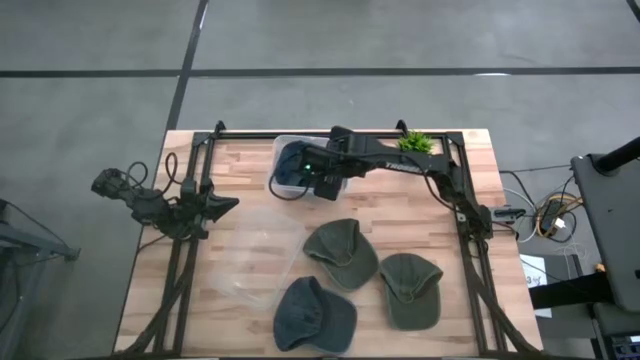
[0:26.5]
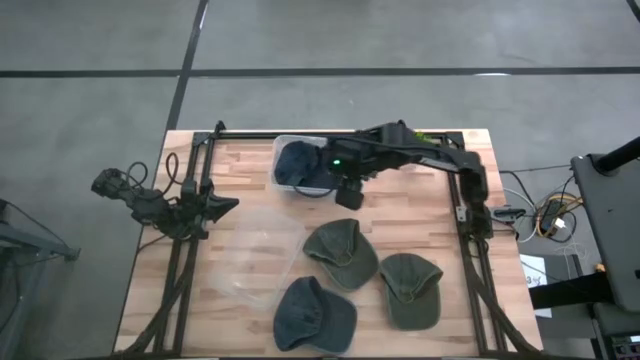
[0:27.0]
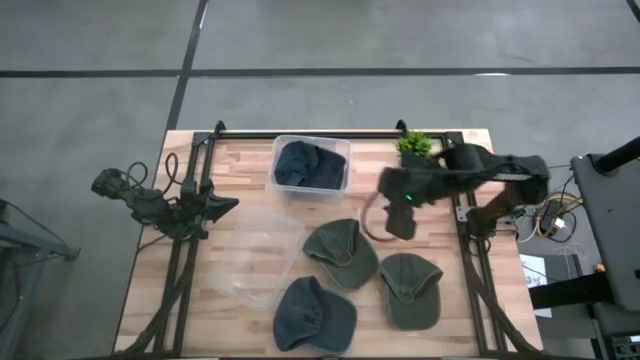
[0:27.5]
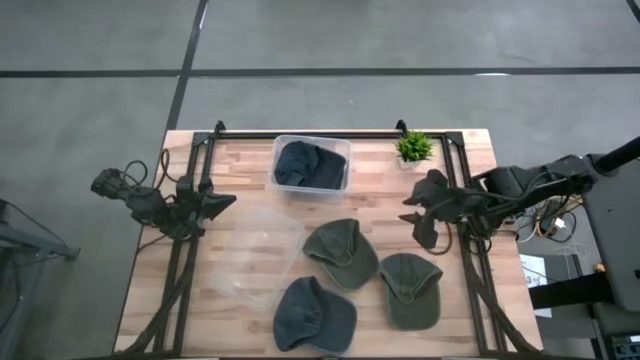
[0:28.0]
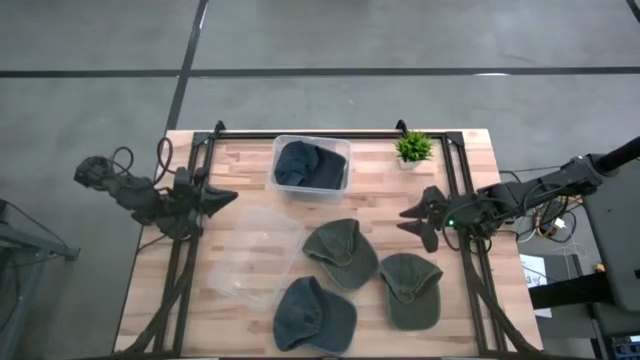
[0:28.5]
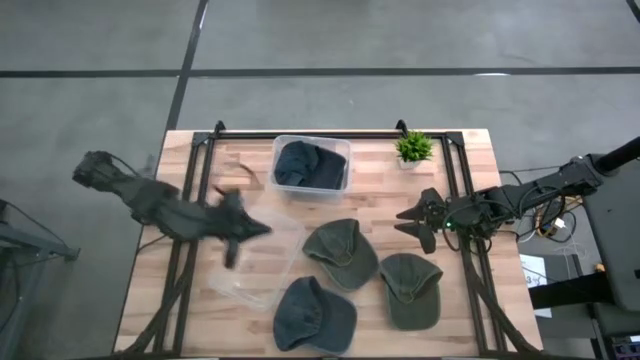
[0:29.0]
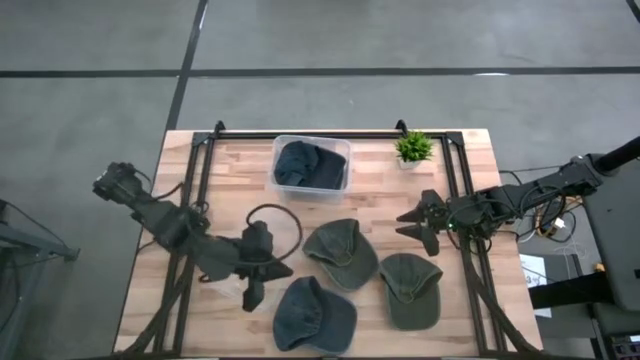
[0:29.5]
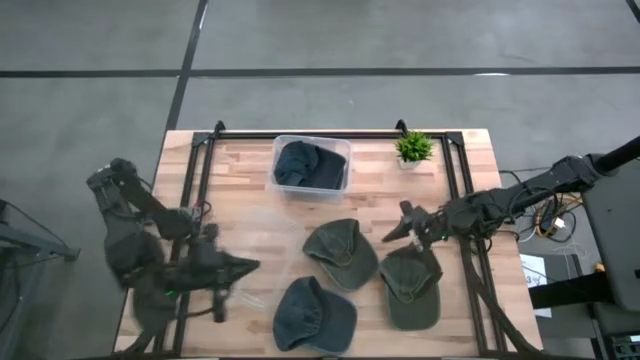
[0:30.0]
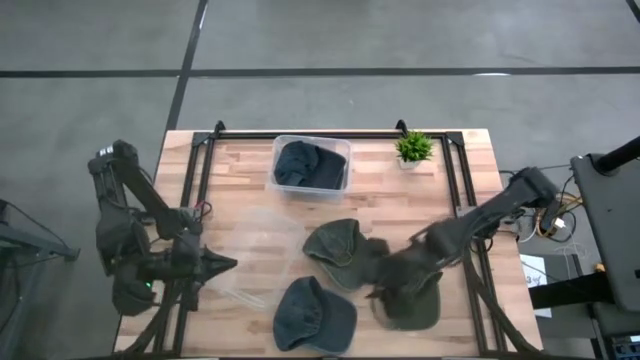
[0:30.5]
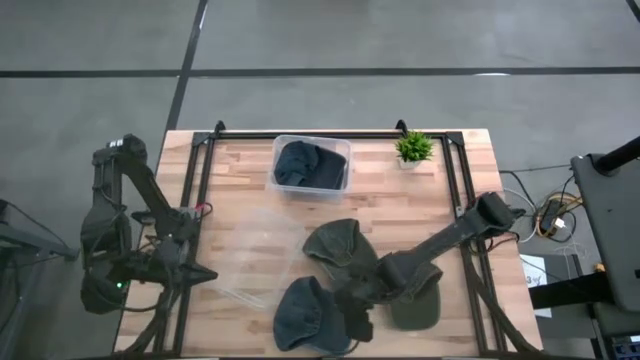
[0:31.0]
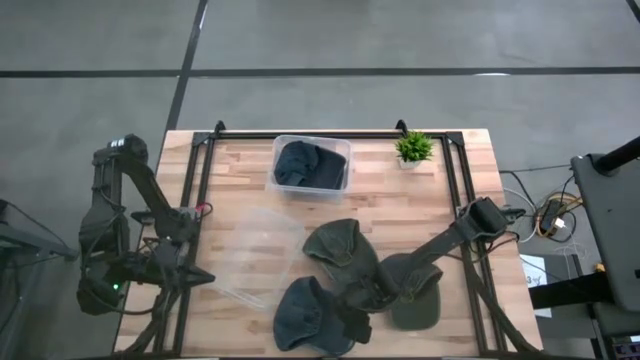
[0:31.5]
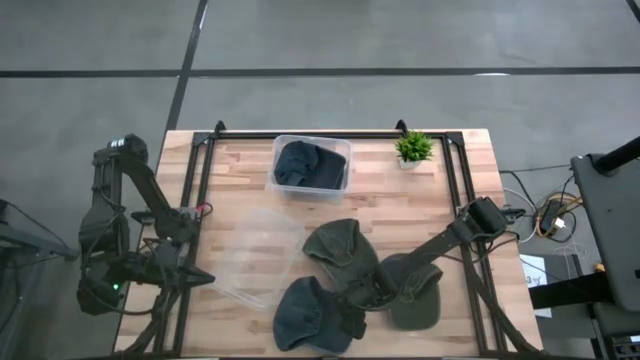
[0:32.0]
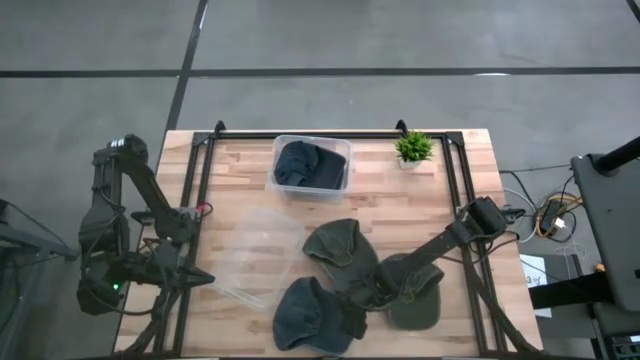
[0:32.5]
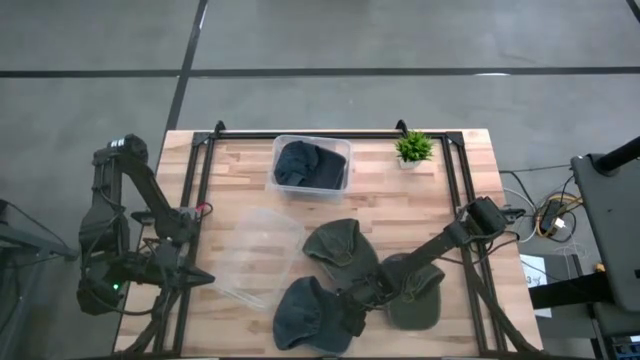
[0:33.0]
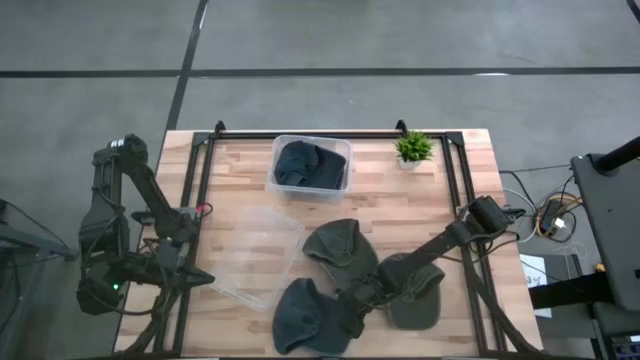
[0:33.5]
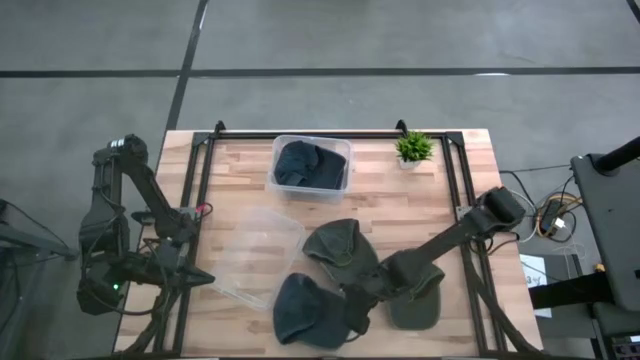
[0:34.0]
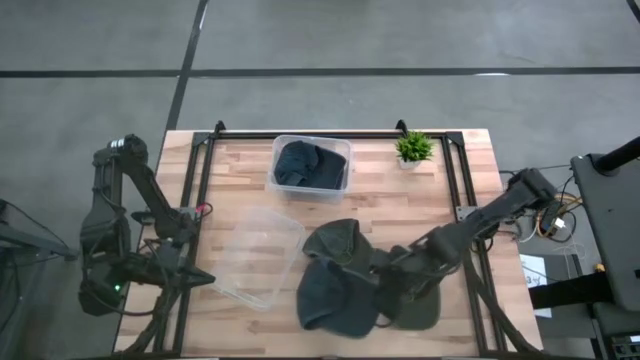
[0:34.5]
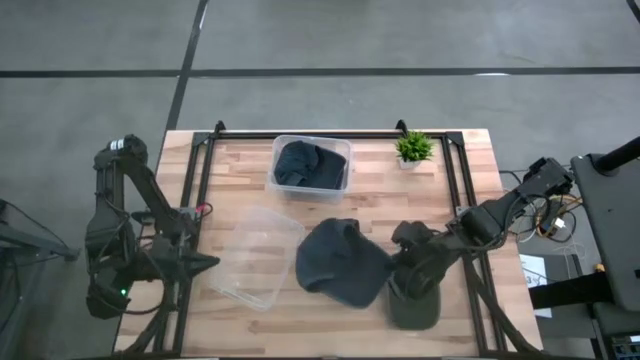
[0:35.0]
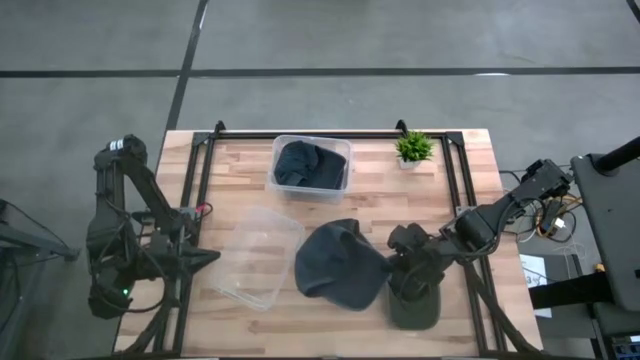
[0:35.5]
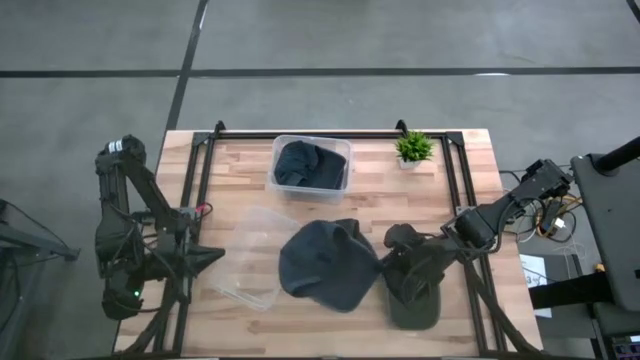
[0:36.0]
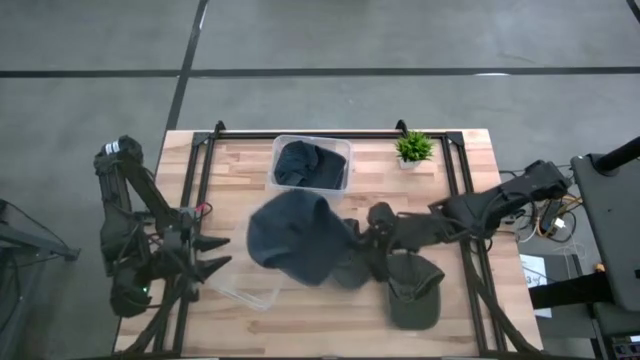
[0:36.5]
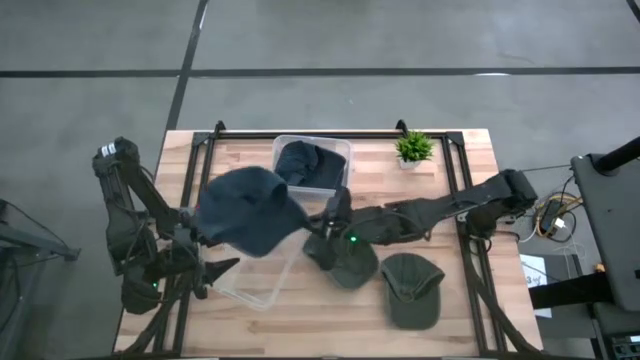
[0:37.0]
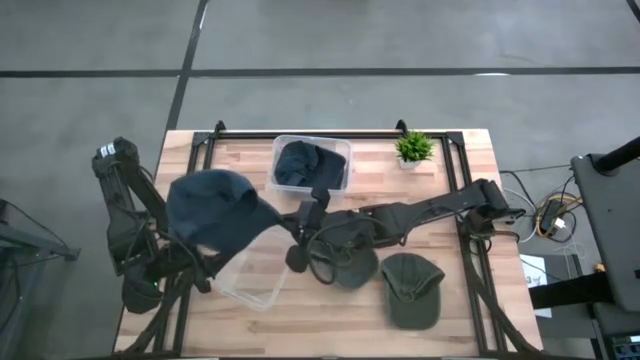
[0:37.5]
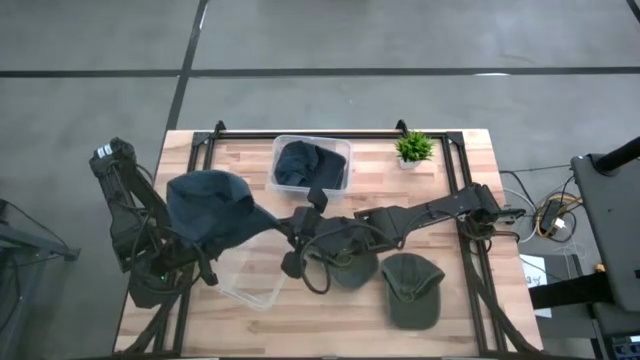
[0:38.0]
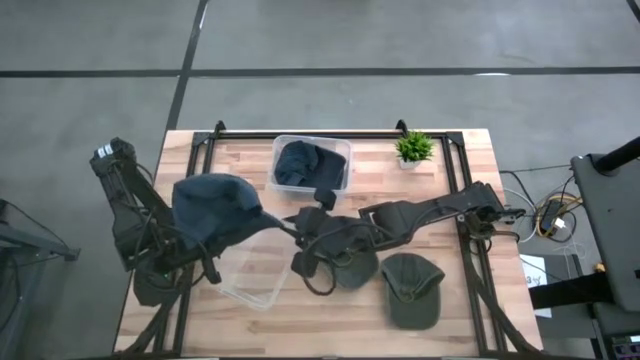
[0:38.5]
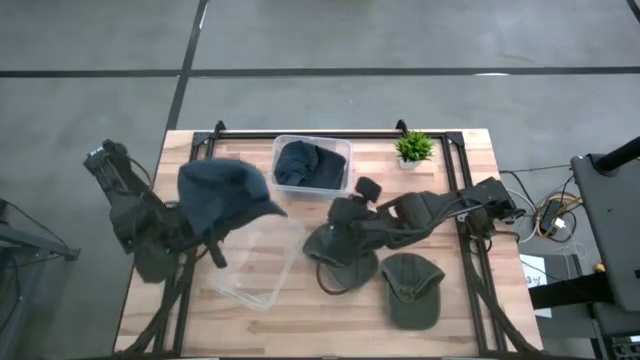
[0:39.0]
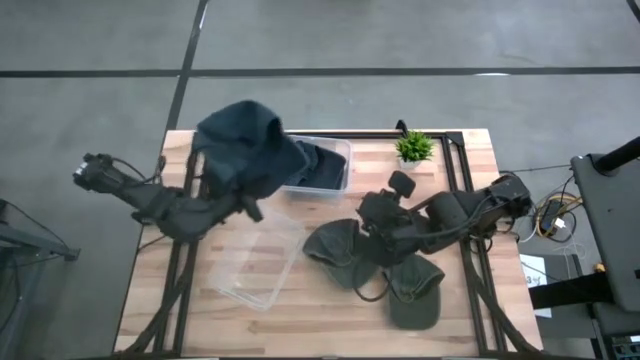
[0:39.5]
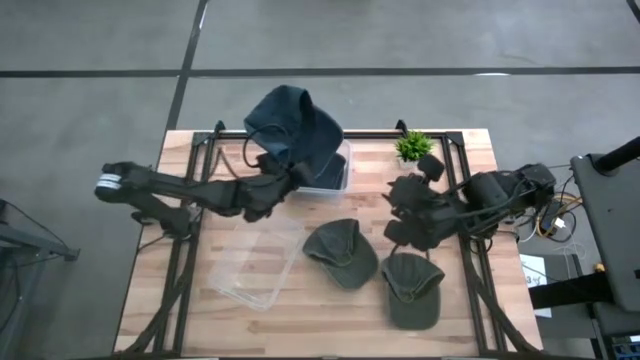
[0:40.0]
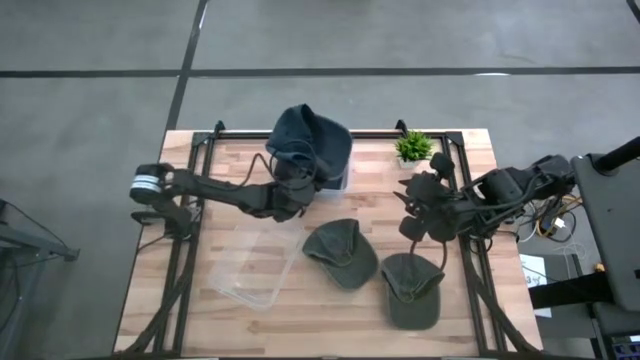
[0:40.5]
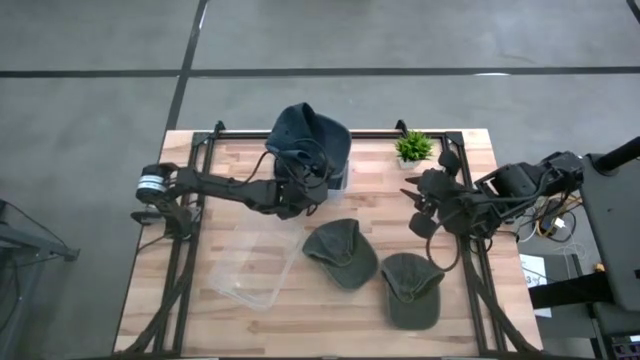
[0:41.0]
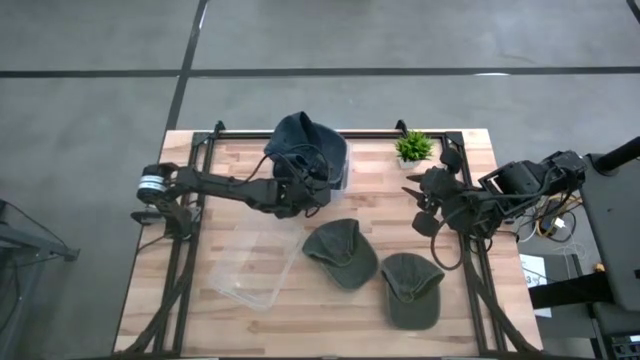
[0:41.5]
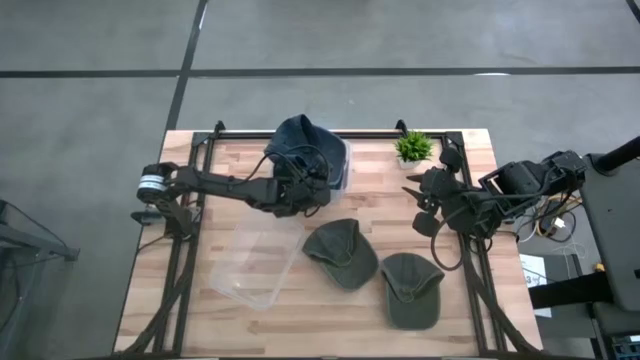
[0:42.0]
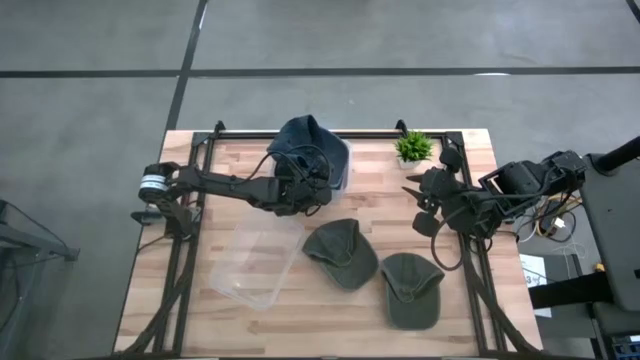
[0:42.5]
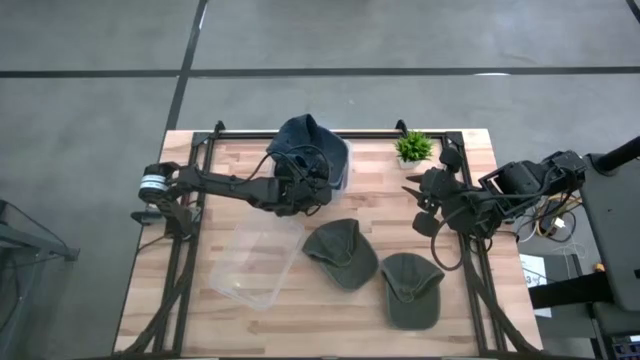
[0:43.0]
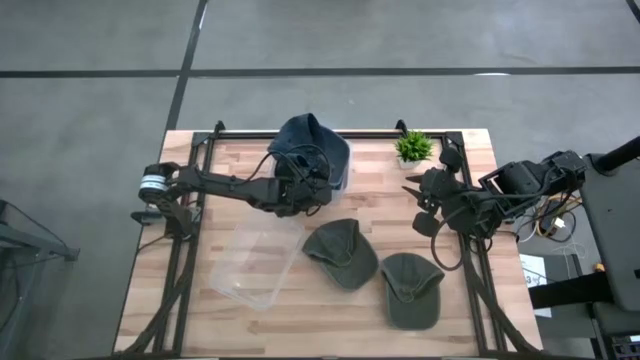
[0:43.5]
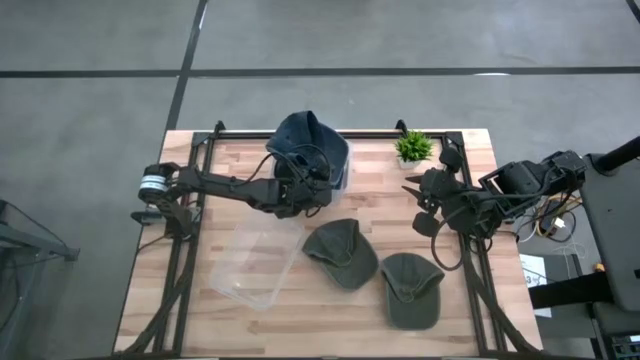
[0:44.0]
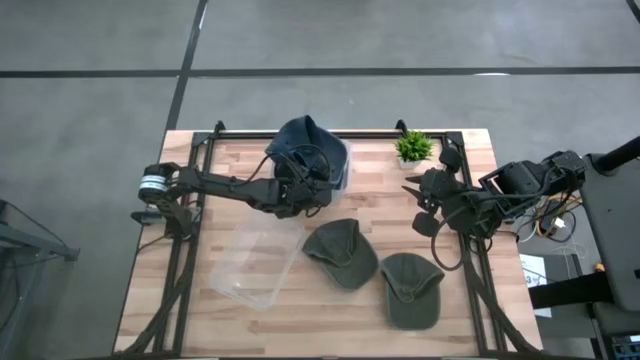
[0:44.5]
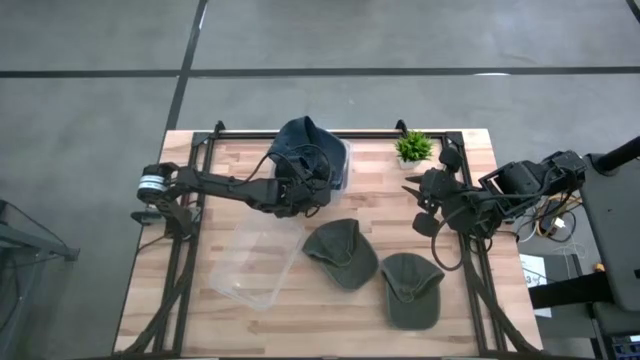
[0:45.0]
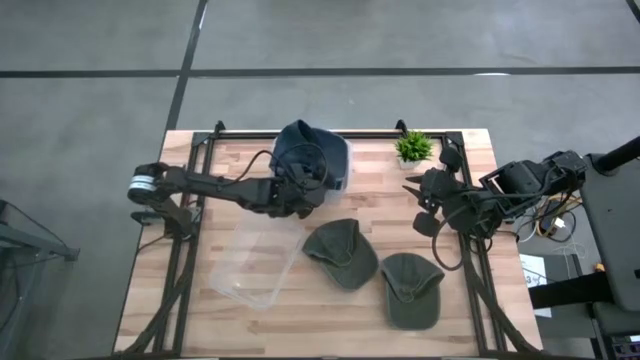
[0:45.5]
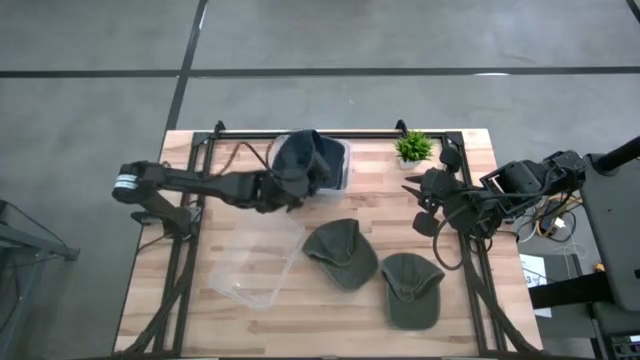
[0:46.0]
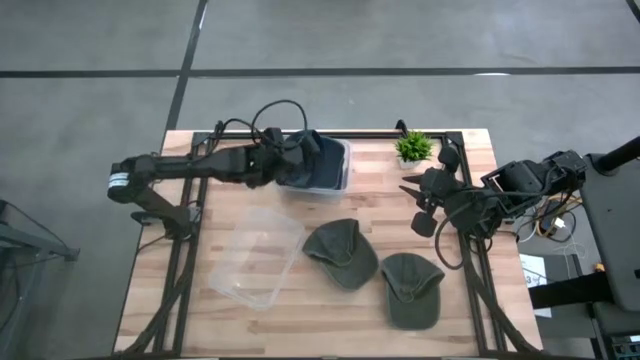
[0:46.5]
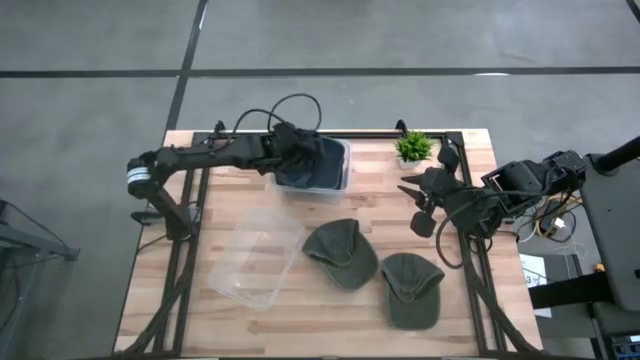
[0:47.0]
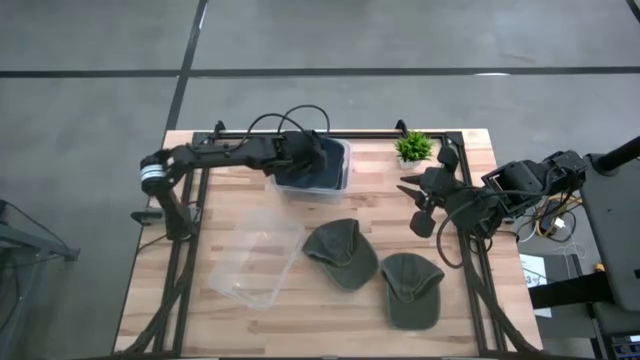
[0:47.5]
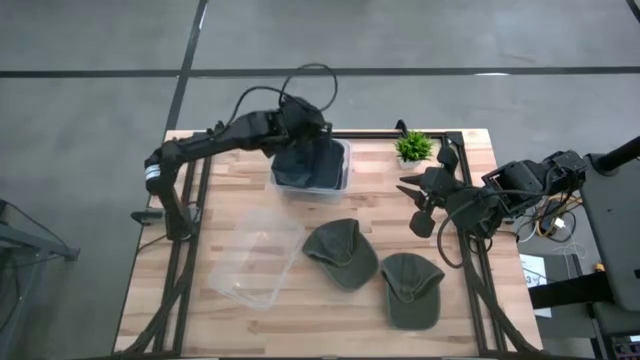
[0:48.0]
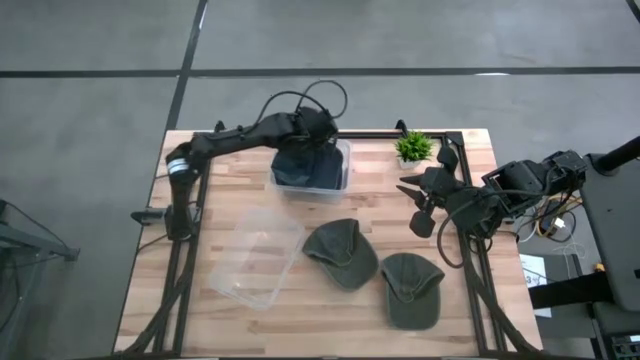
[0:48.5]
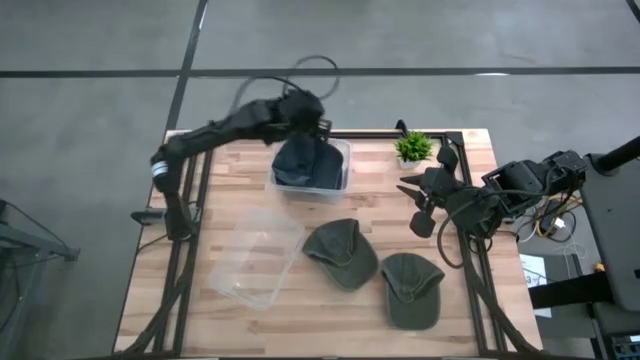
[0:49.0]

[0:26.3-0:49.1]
Task: Pick & Place hat
Put the blue cap into the top transparent bin
